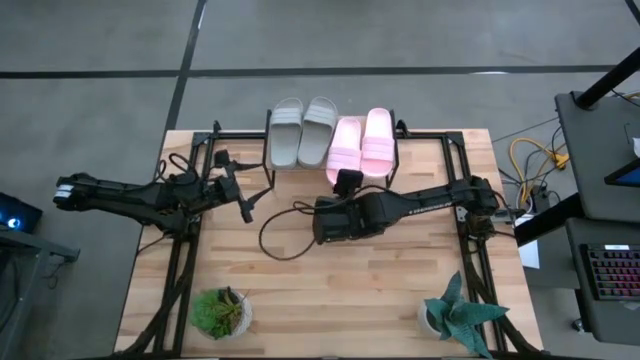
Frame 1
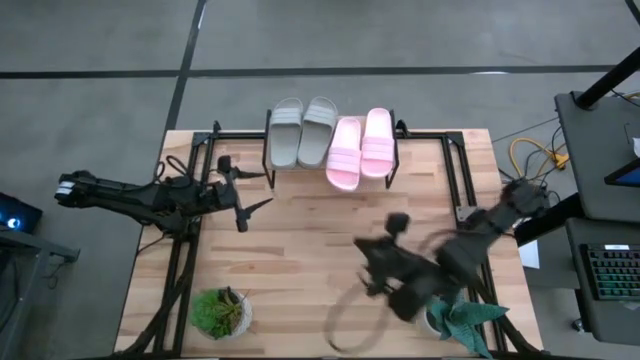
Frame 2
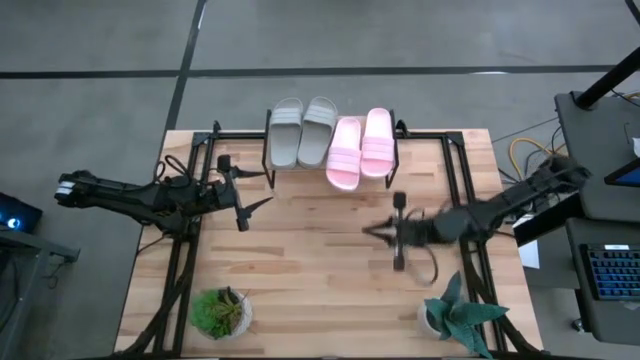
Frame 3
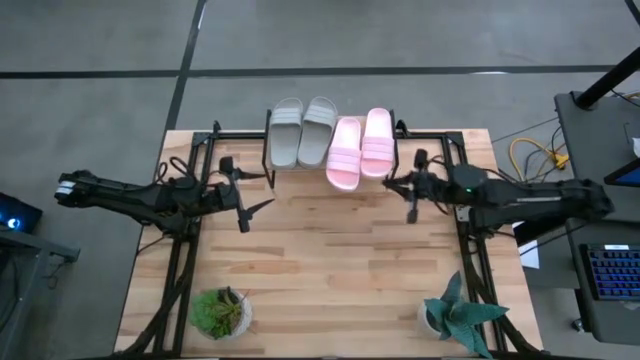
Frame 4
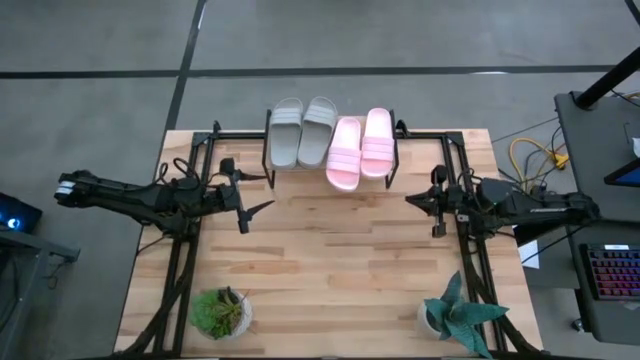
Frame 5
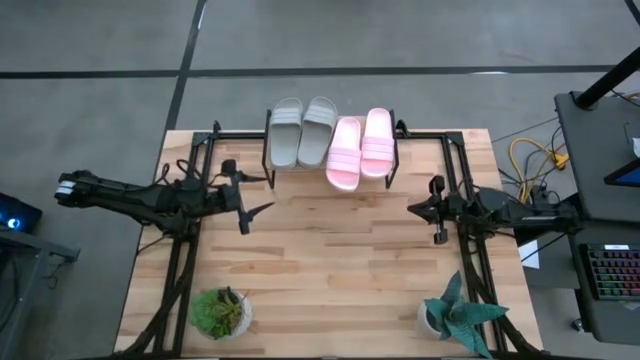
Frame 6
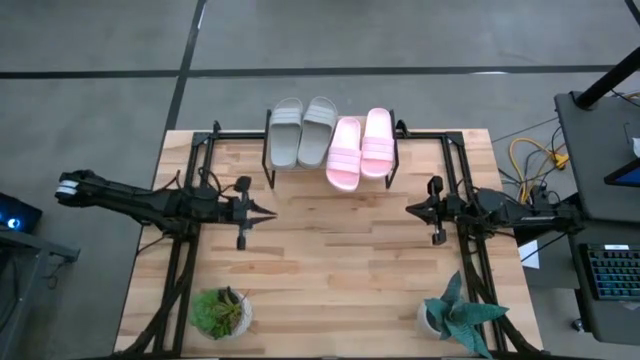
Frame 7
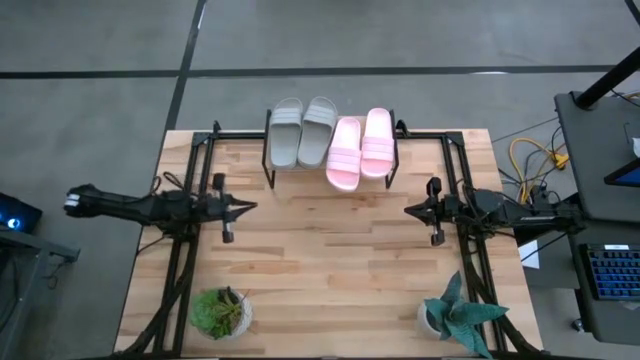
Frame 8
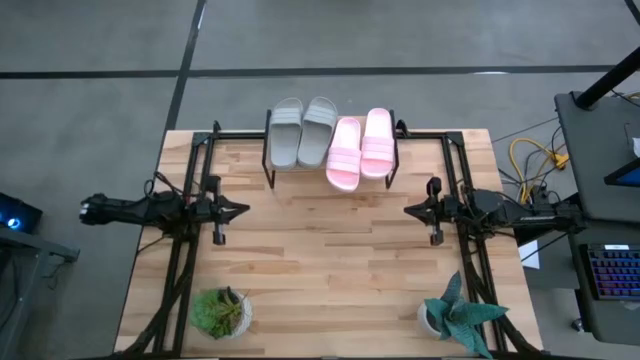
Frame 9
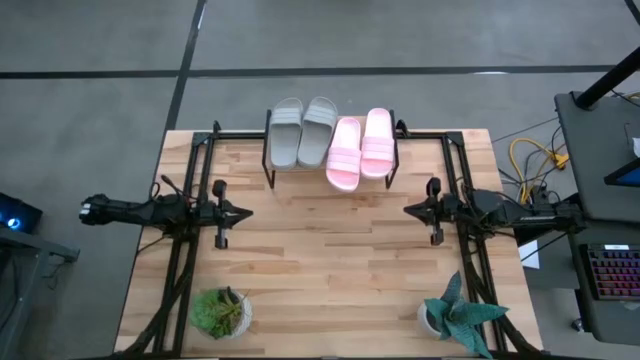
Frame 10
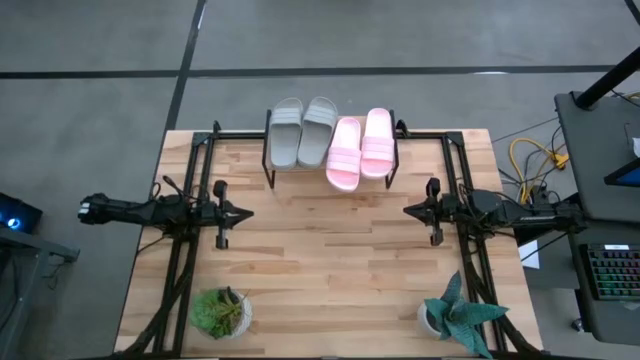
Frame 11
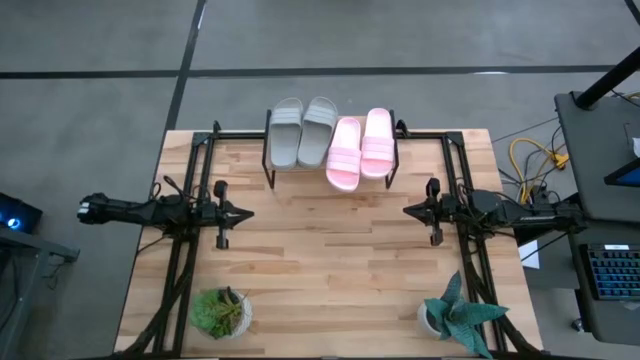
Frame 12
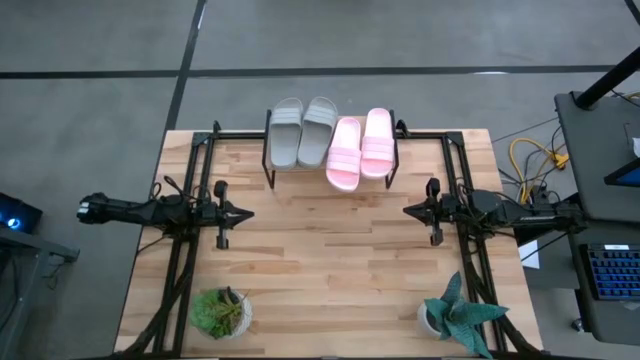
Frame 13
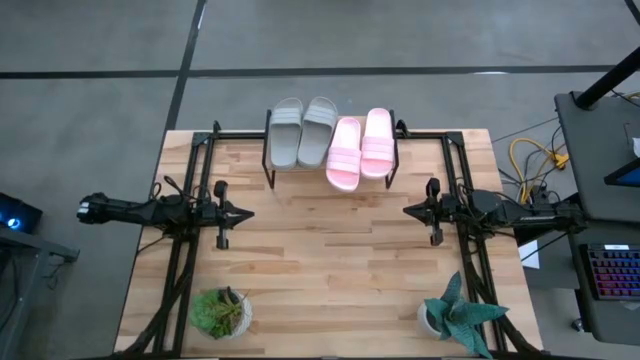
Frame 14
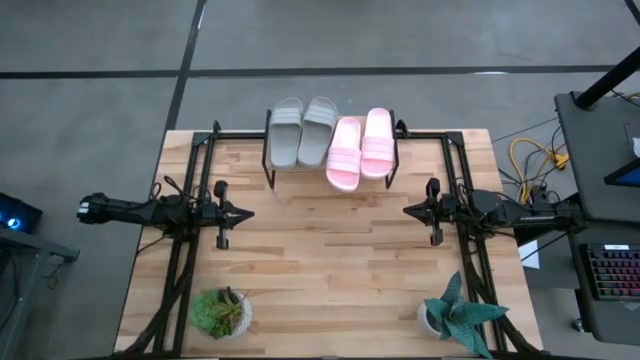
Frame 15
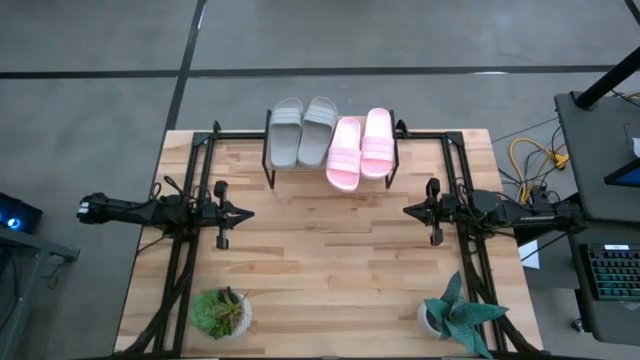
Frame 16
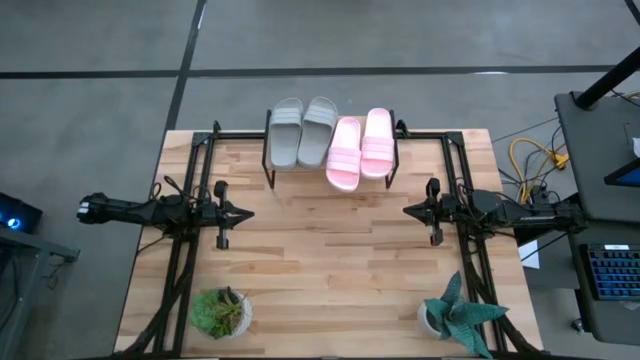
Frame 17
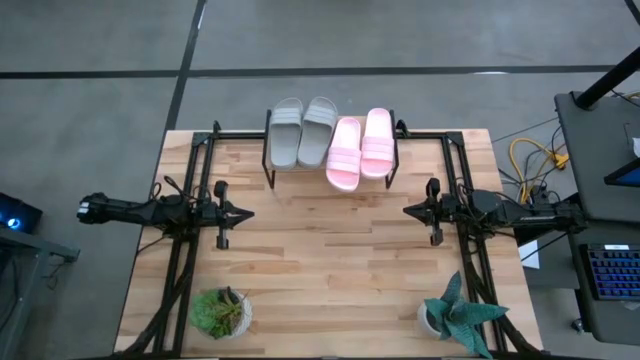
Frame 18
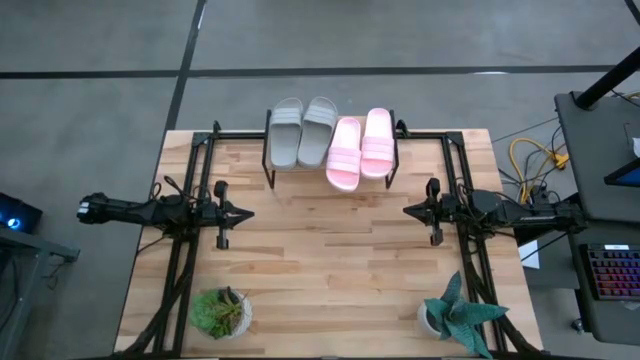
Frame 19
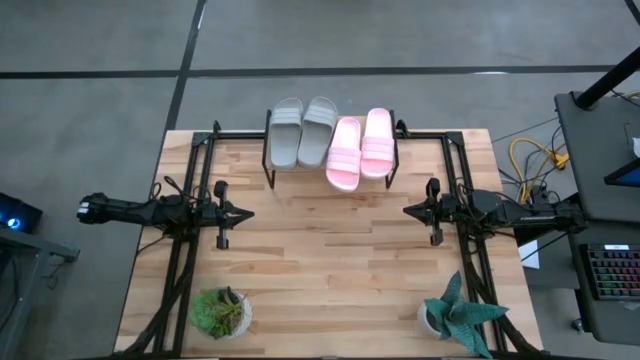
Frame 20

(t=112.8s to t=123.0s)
Task: Pick and place slides into the shelf
Return to Home Position

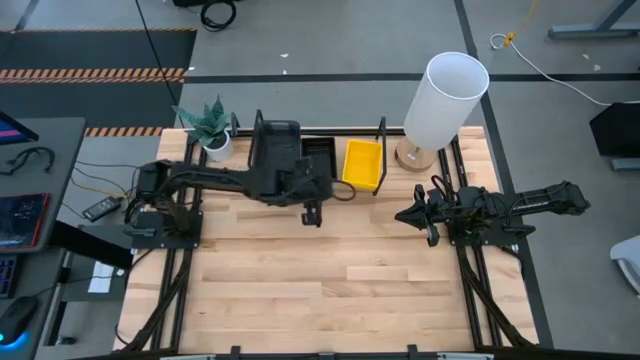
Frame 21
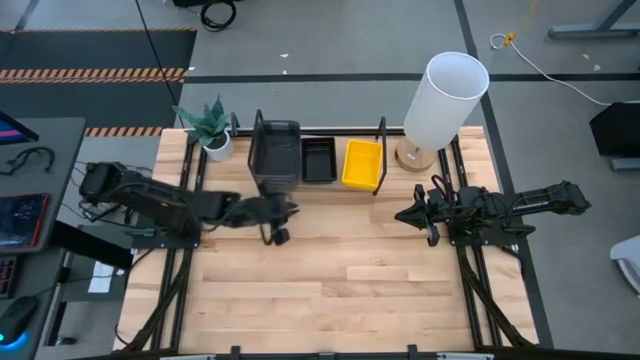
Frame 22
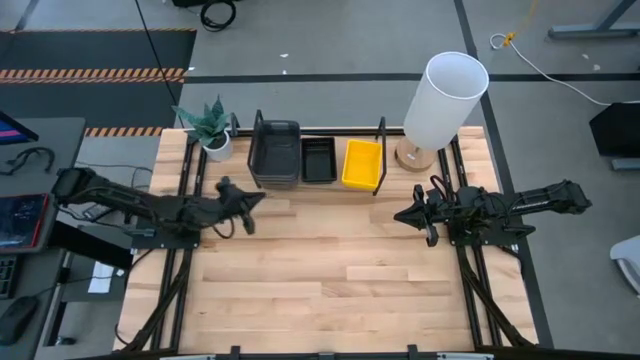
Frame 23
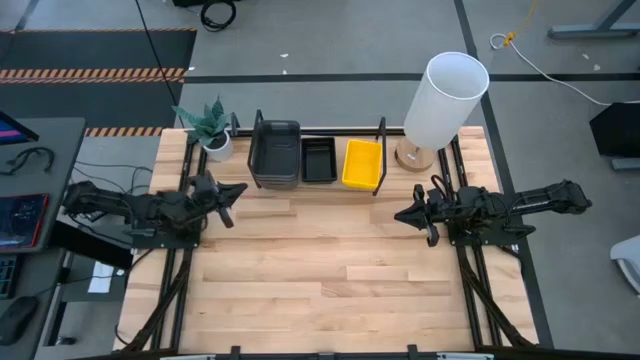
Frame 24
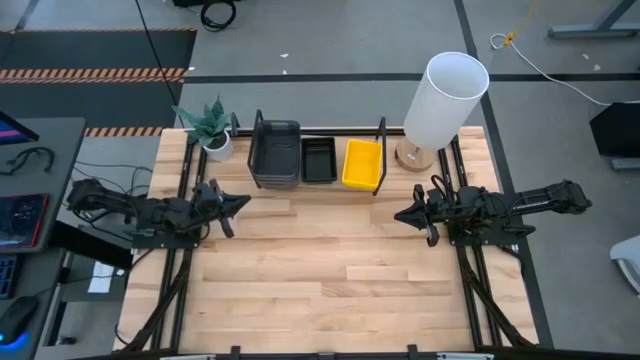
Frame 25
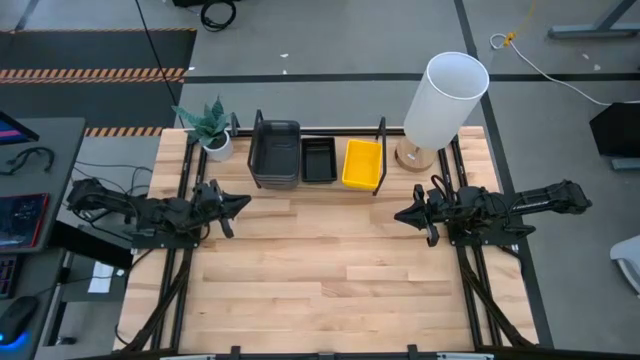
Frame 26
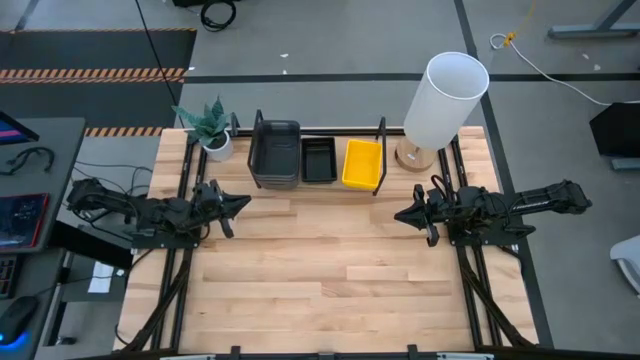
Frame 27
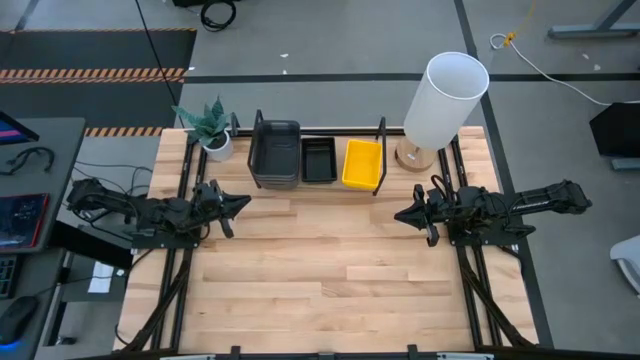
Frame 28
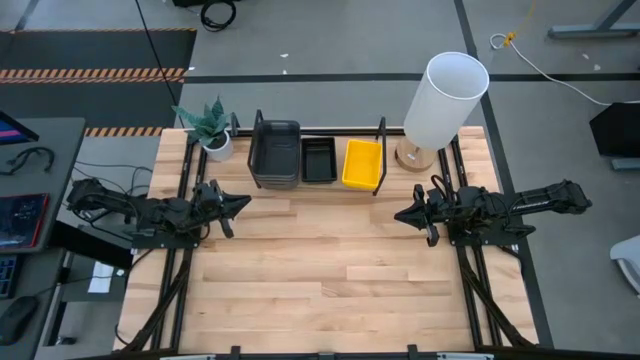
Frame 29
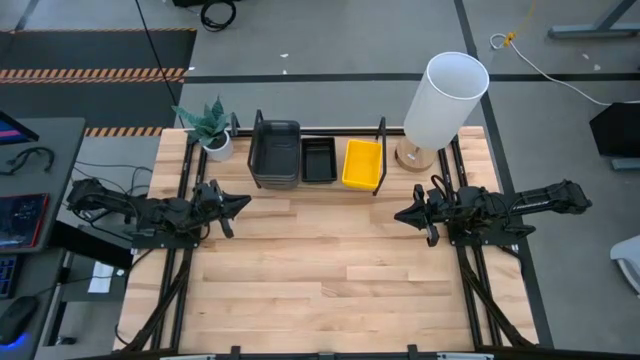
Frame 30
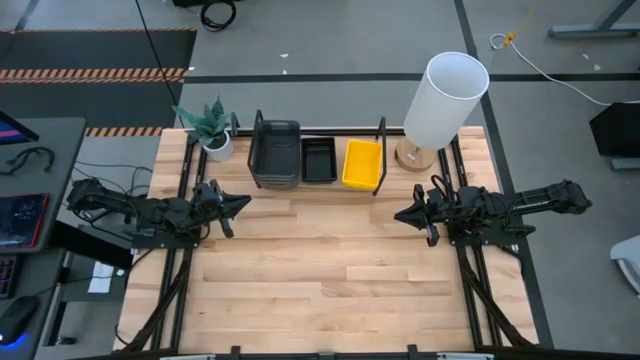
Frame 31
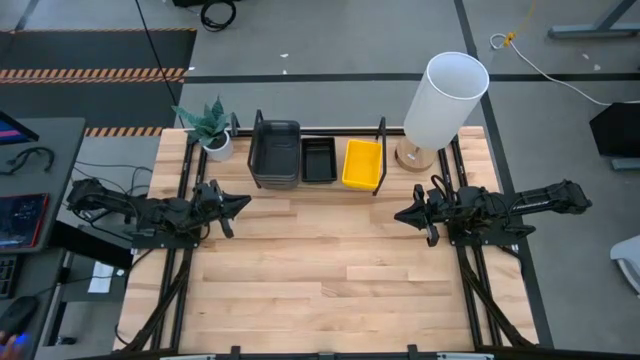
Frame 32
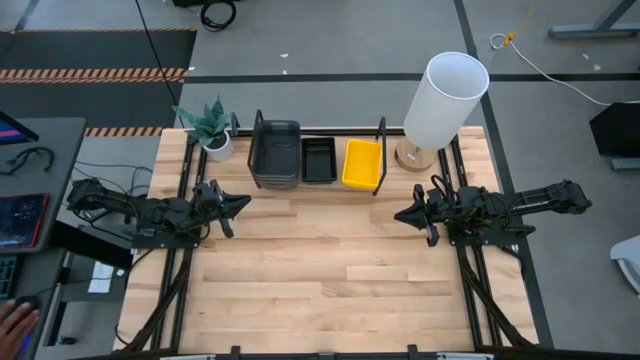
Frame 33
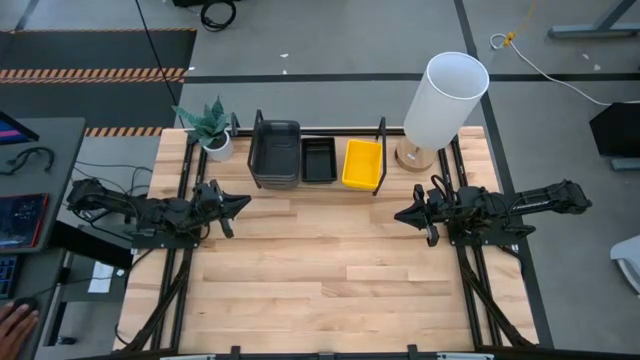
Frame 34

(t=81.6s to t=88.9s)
Task: Stack baskets on shelf by color
Return to Home Position
